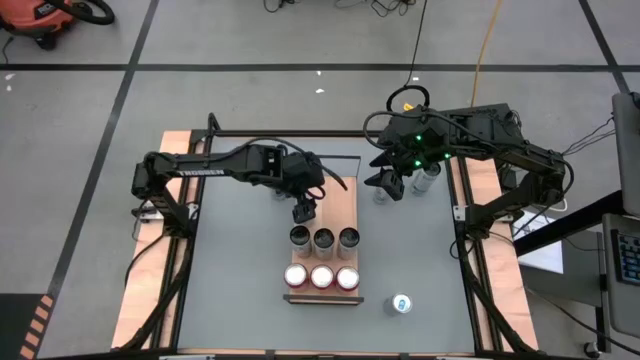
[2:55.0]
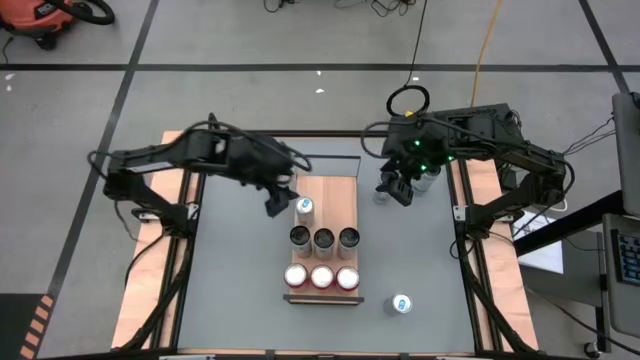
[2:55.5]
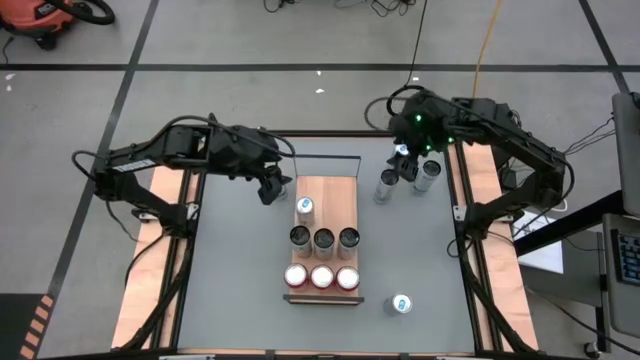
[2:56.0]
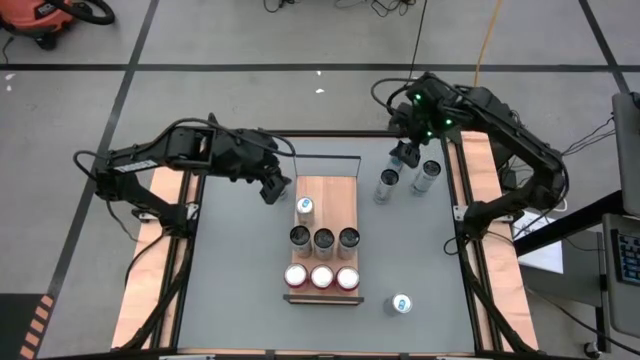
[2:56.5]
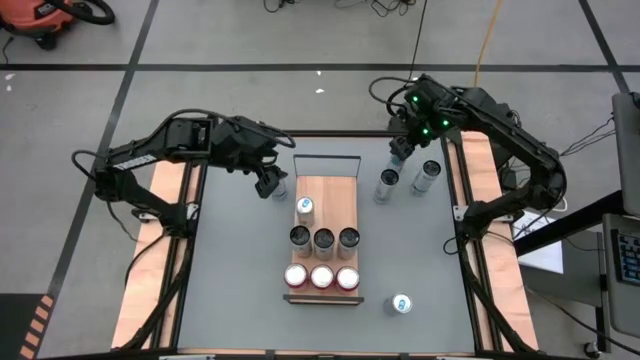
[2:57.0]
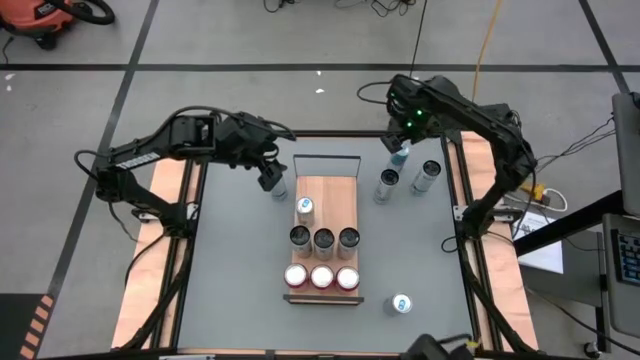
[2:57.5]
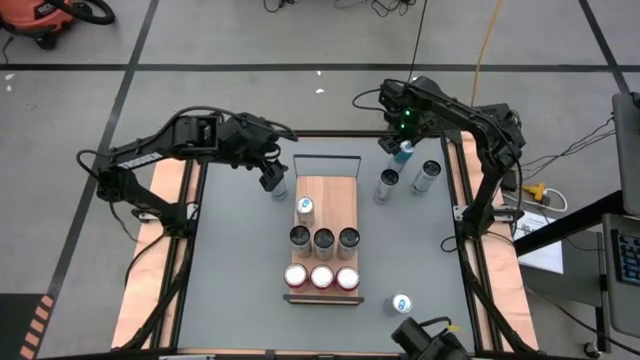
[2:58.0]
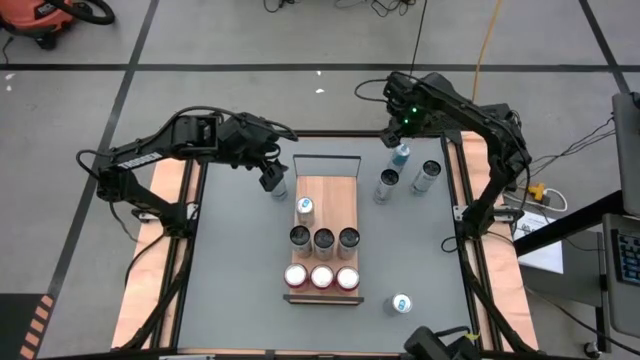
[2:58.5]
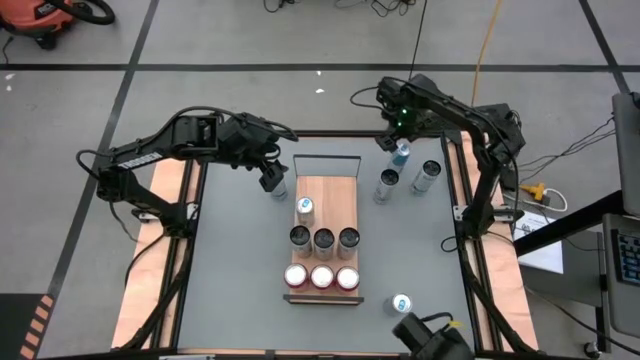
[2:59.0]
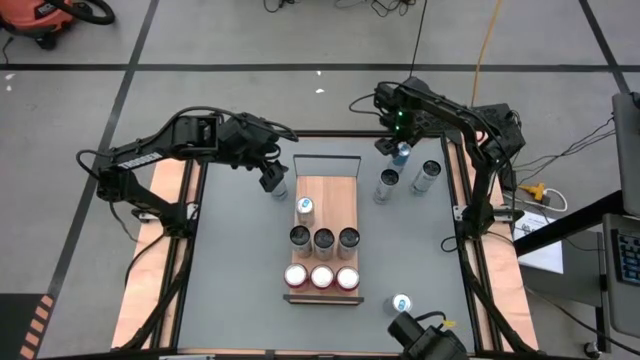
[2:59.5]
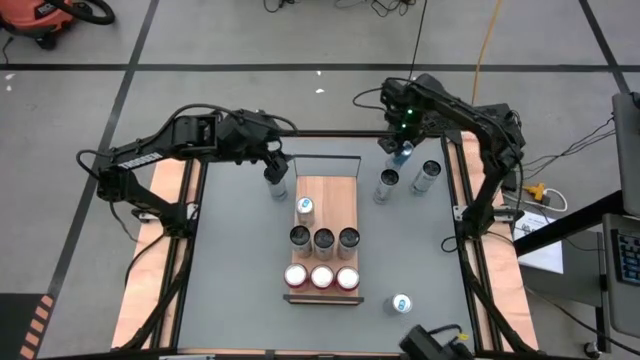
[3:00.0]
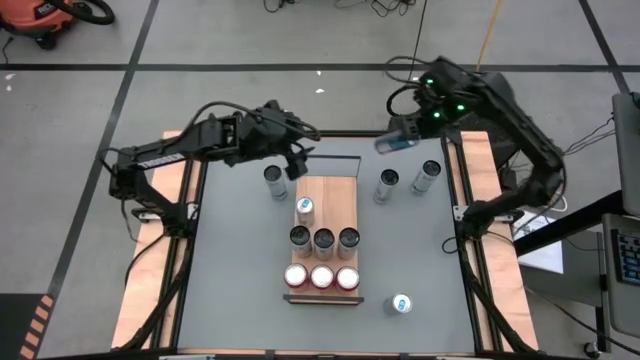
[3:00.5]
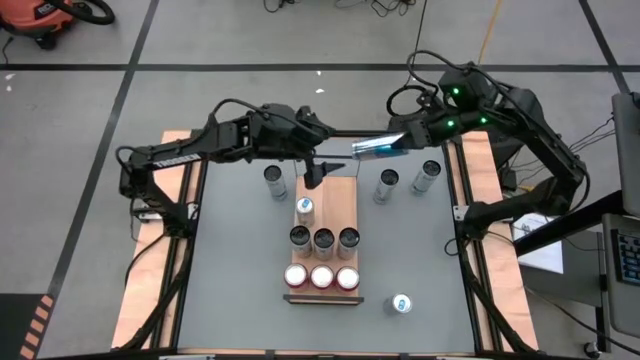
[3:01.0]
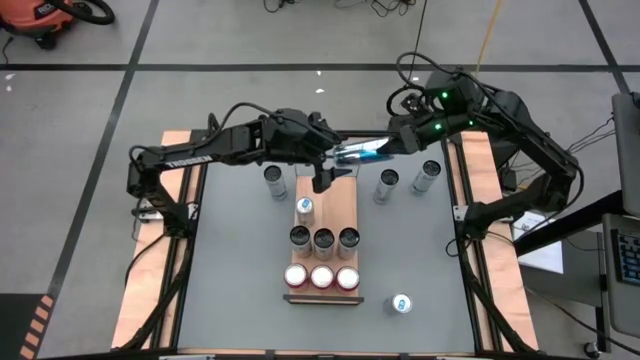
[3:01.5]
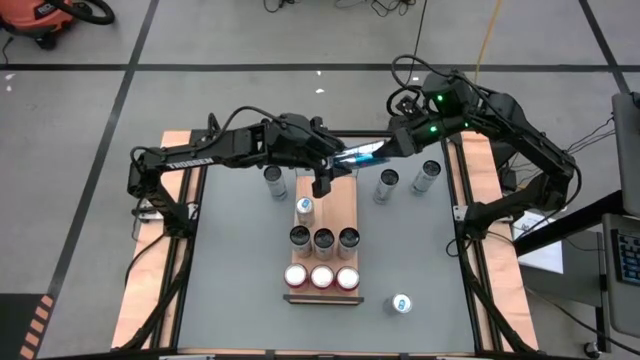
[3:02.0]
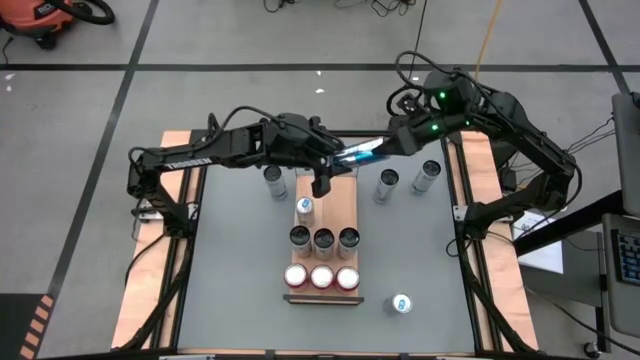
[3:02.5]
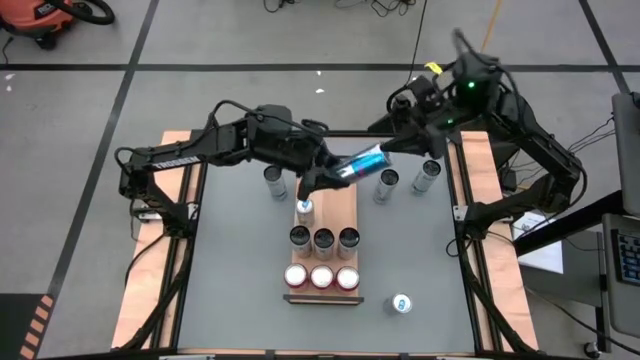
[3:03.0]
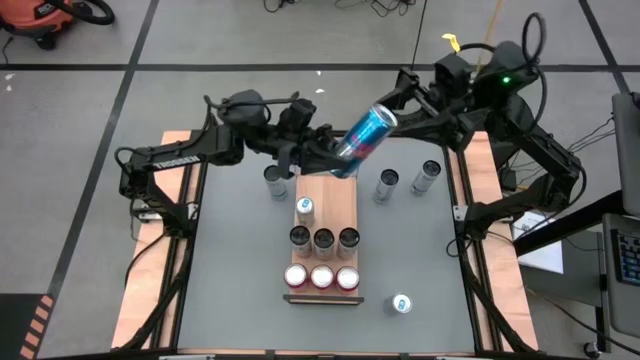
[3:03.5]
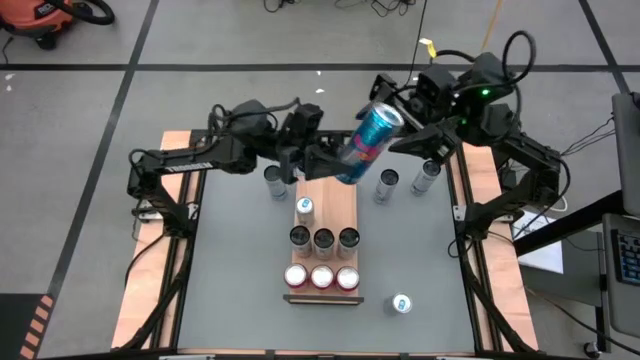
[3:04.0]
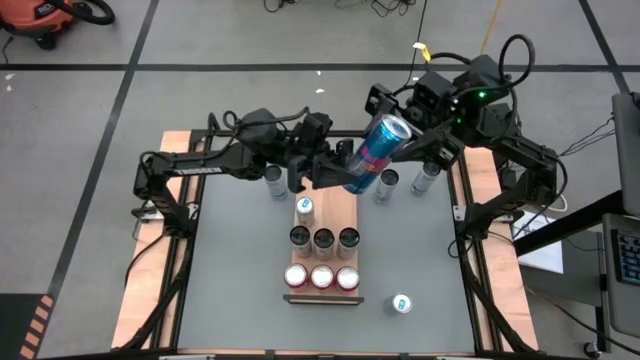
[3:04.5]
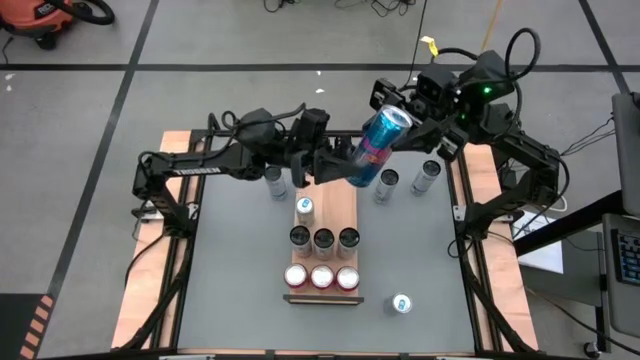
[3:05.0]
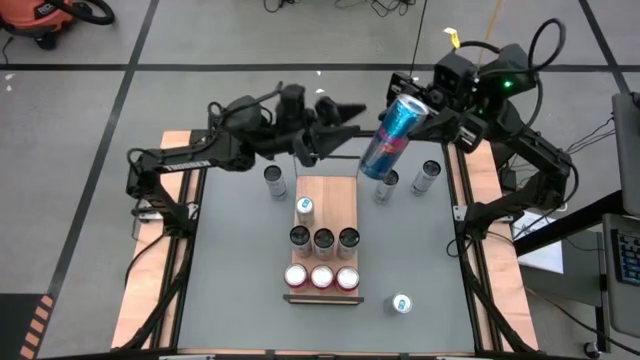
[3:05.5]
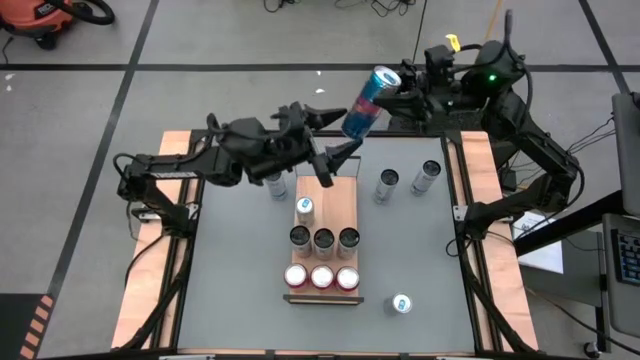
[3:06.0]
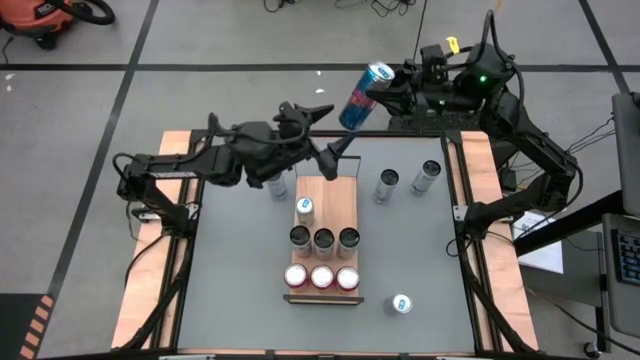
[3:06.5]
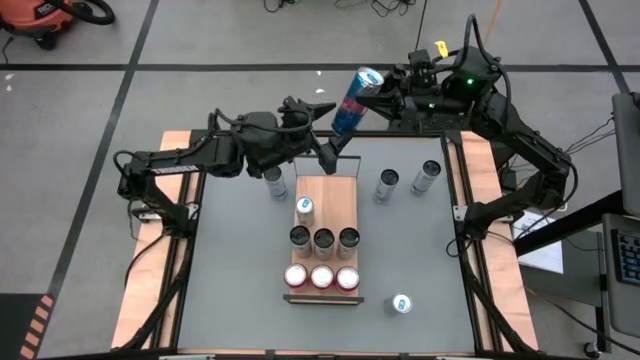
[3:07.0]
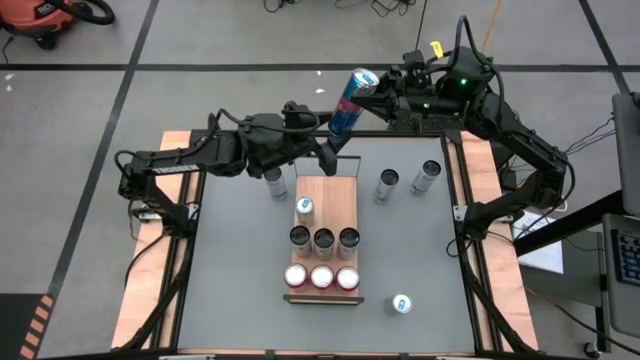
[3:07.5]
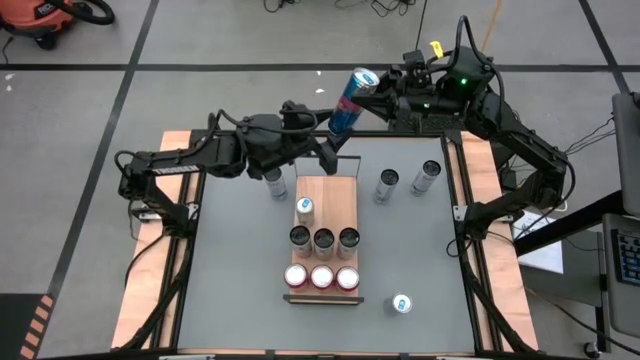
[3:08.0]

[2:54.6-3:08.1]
Task: Sort soda cans
Put the top blue soda can on the shelf and align it with the other blue soda can
